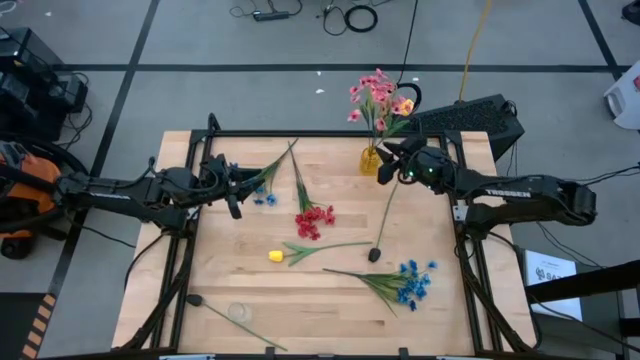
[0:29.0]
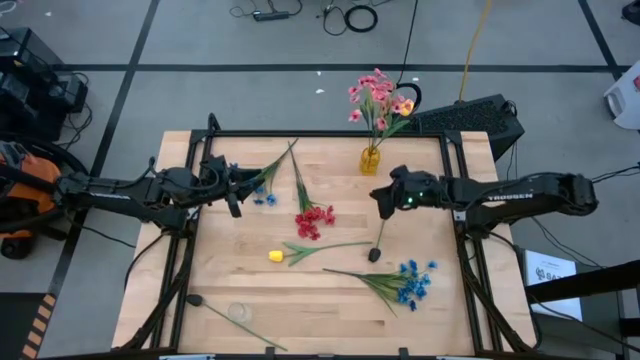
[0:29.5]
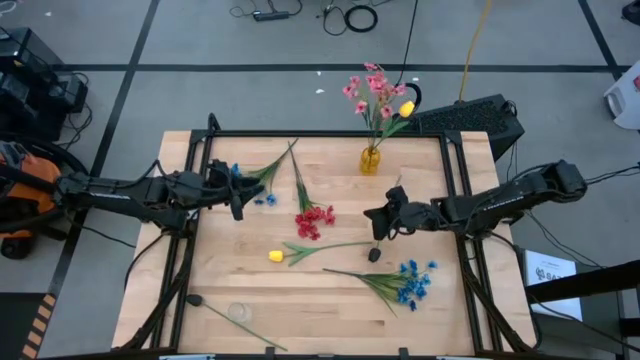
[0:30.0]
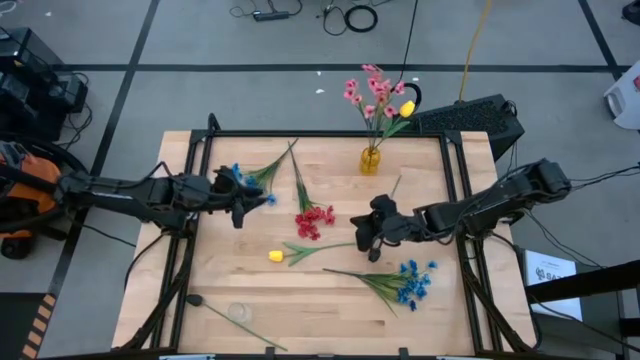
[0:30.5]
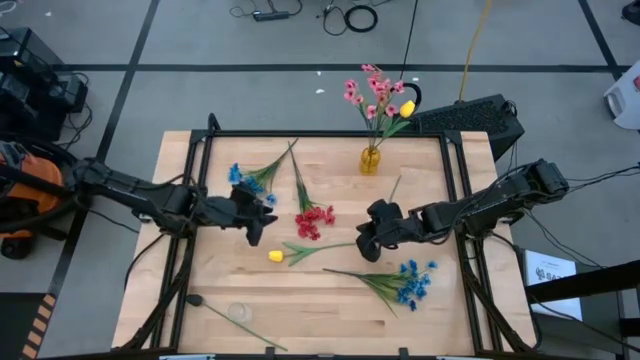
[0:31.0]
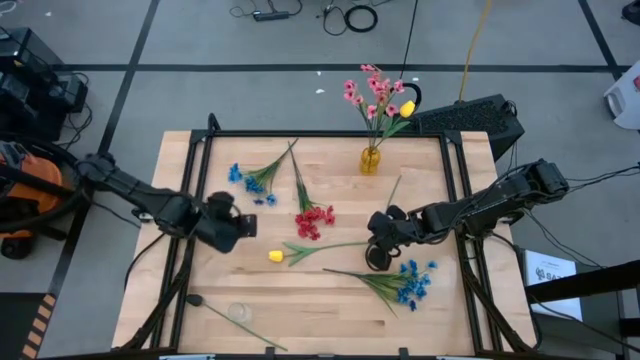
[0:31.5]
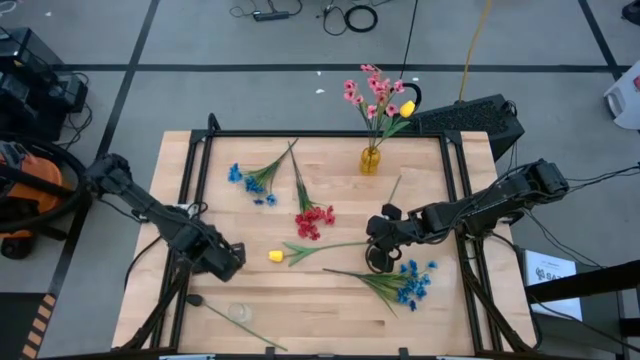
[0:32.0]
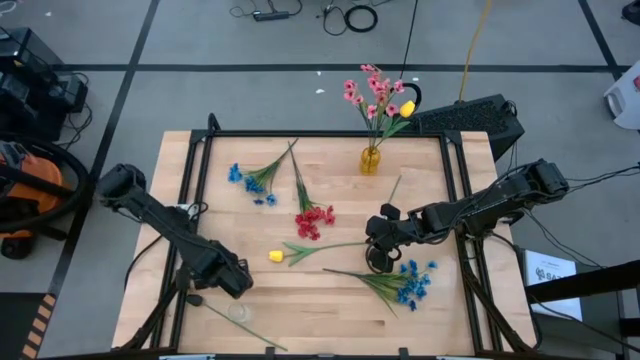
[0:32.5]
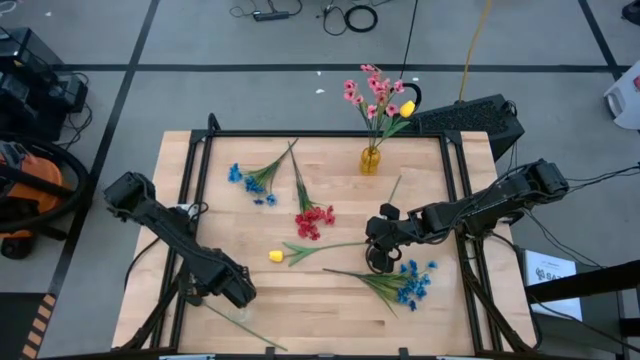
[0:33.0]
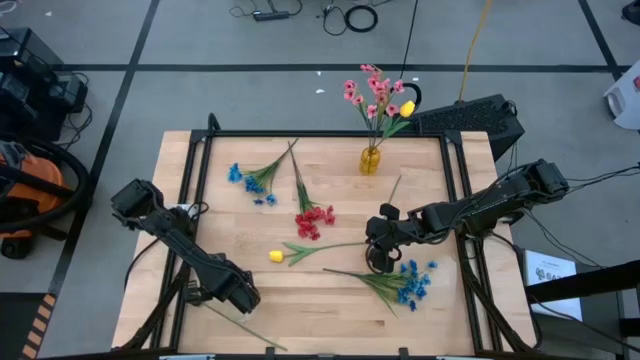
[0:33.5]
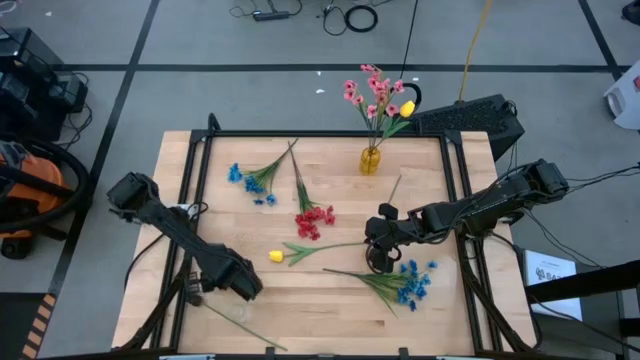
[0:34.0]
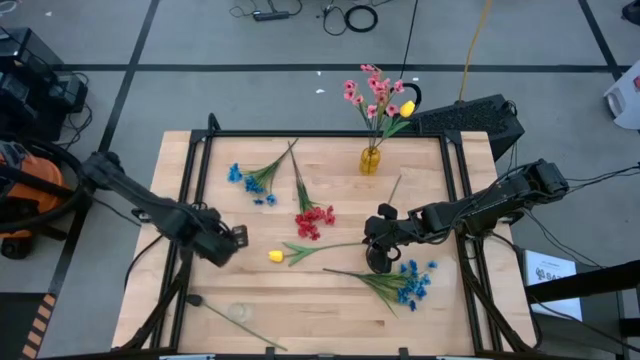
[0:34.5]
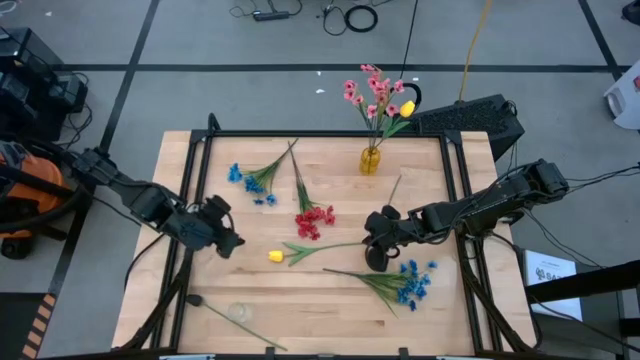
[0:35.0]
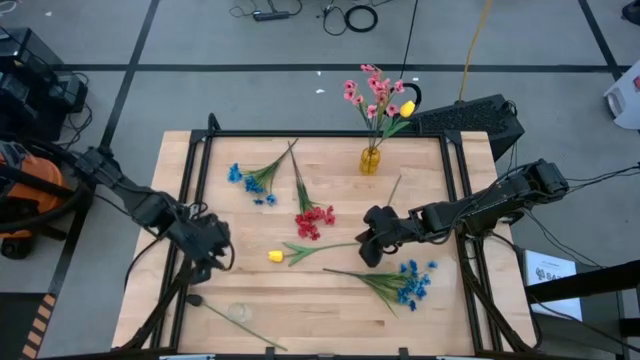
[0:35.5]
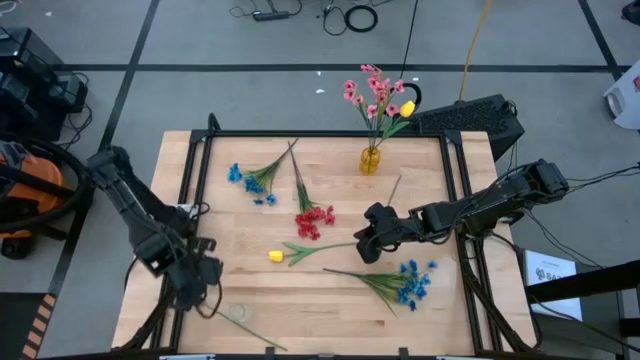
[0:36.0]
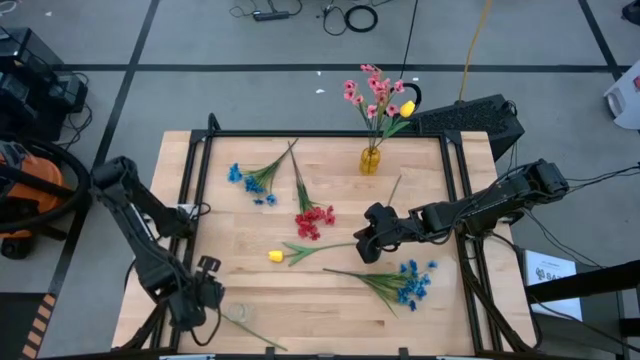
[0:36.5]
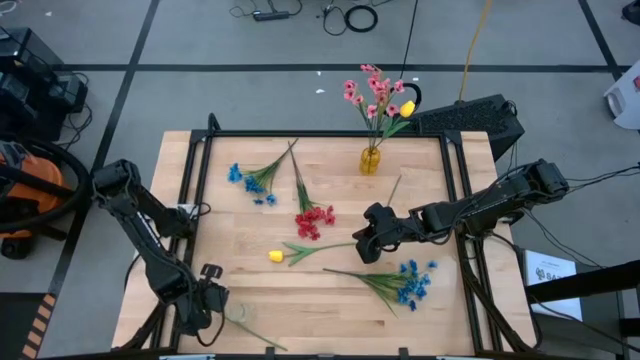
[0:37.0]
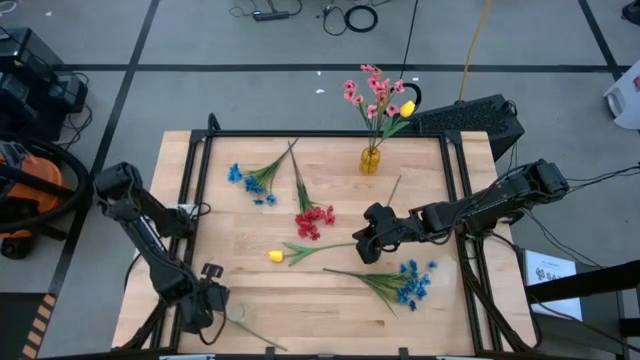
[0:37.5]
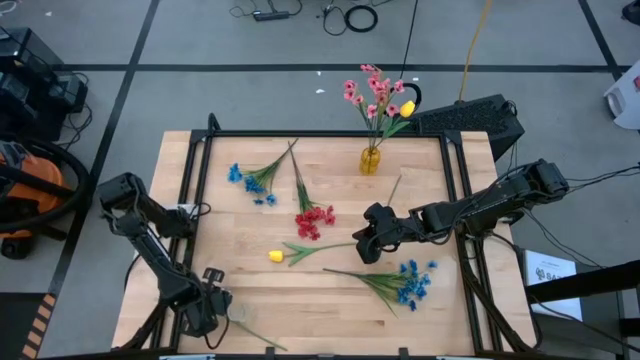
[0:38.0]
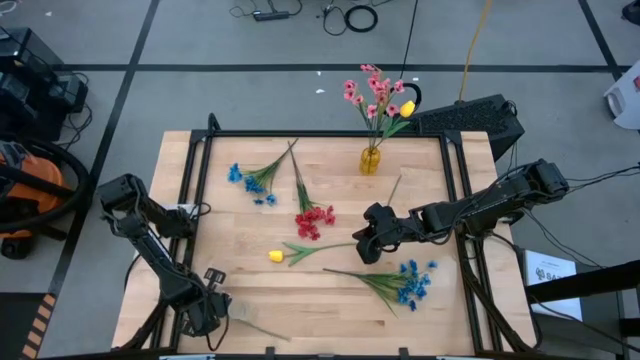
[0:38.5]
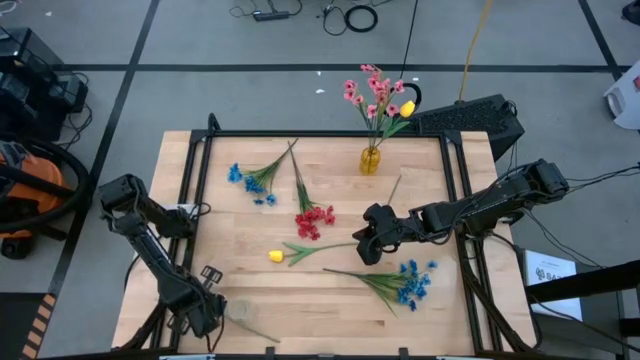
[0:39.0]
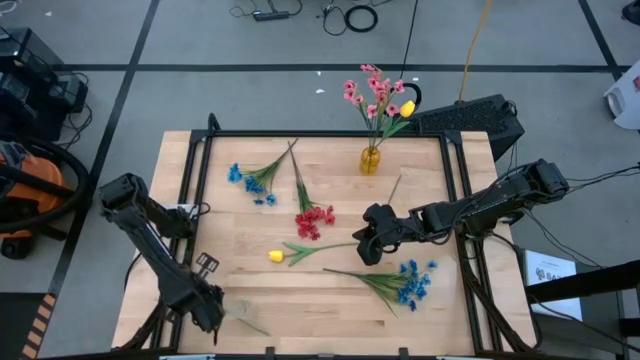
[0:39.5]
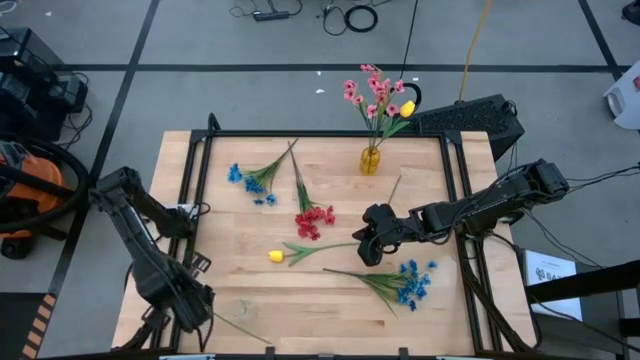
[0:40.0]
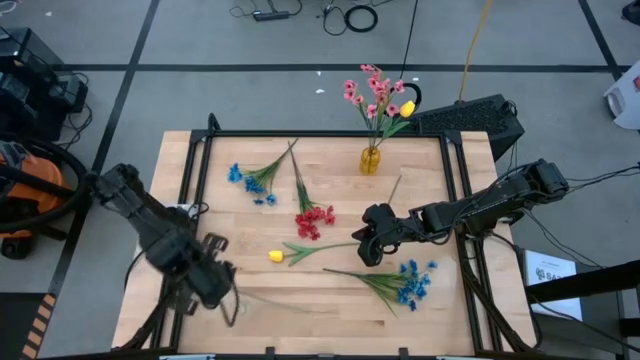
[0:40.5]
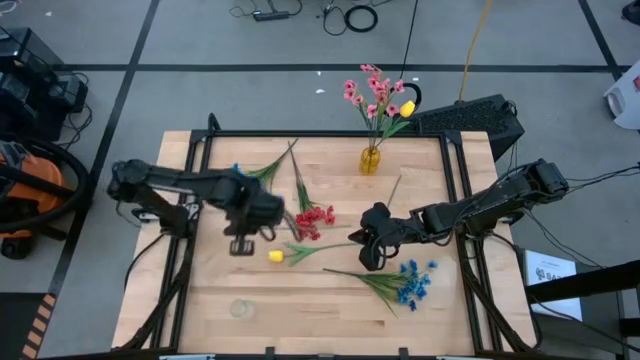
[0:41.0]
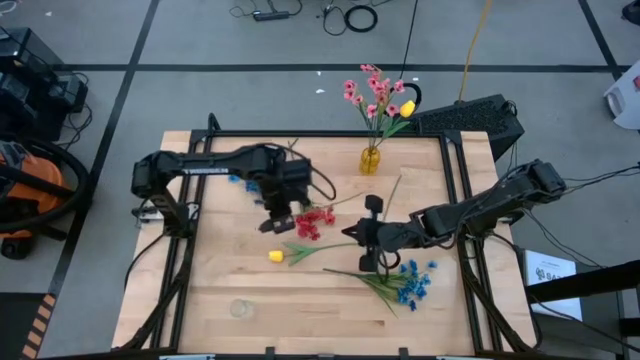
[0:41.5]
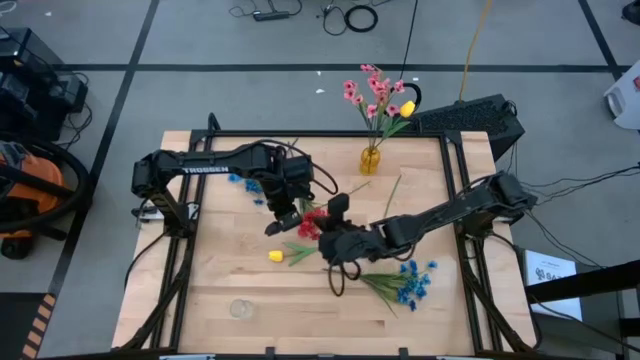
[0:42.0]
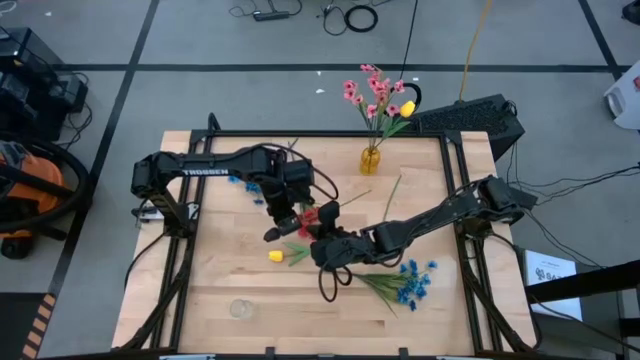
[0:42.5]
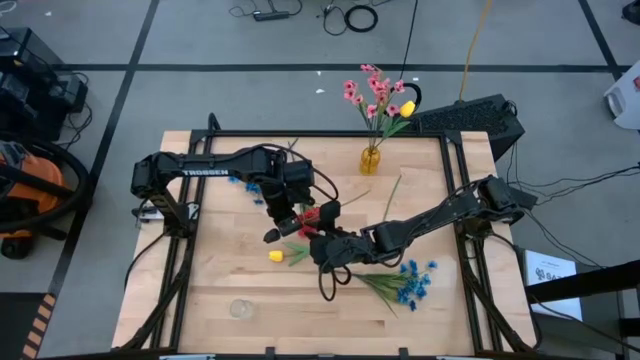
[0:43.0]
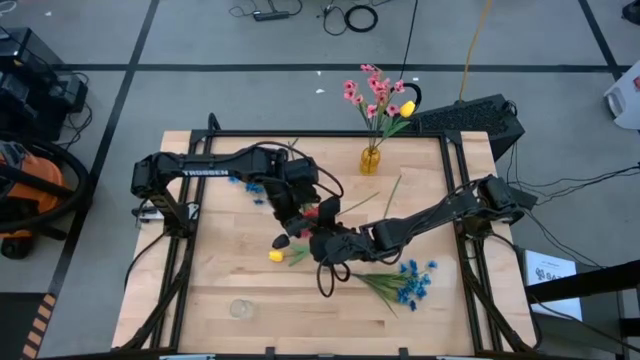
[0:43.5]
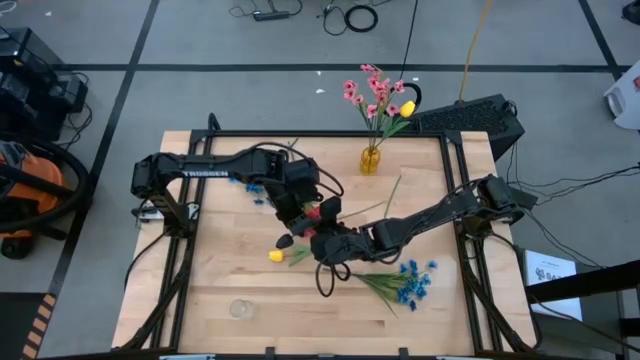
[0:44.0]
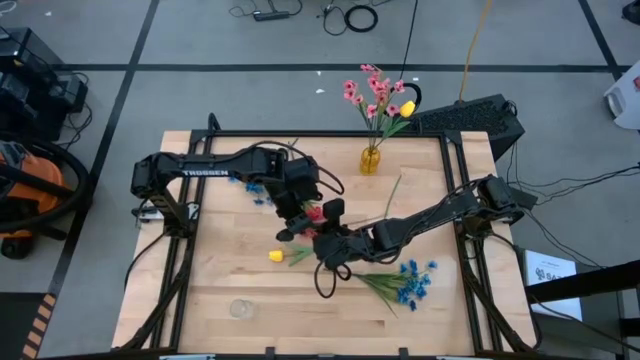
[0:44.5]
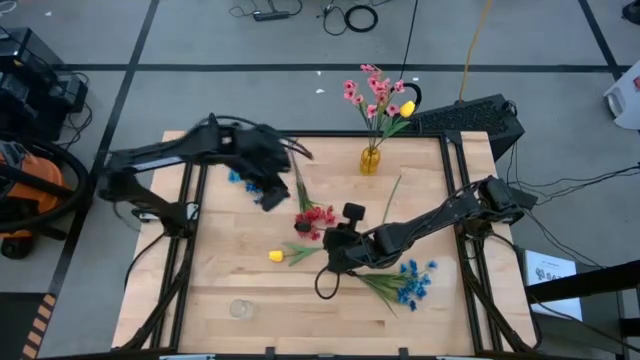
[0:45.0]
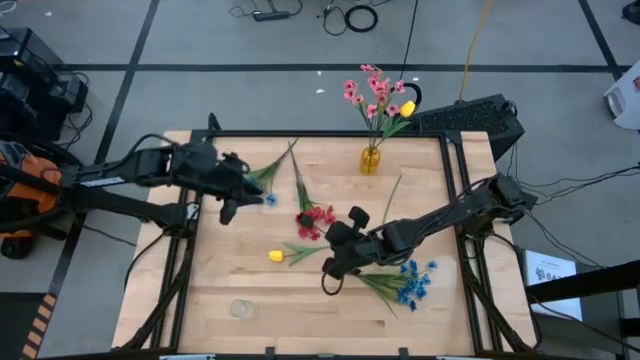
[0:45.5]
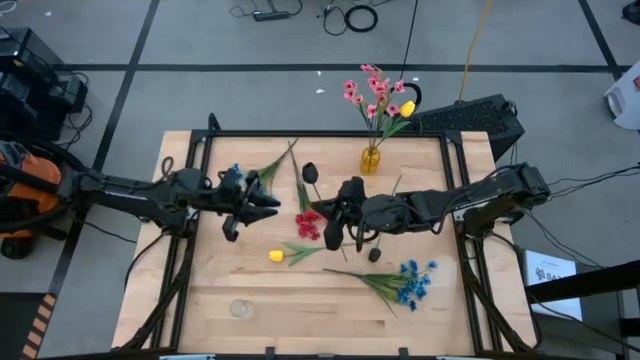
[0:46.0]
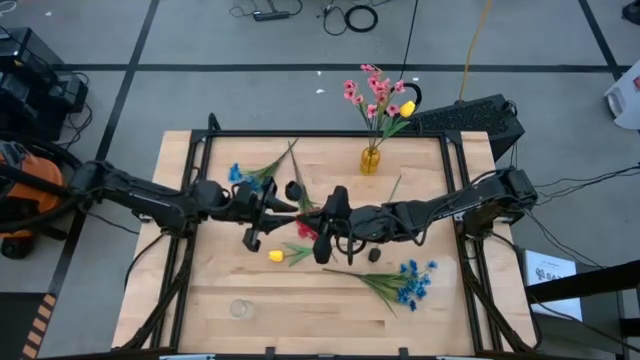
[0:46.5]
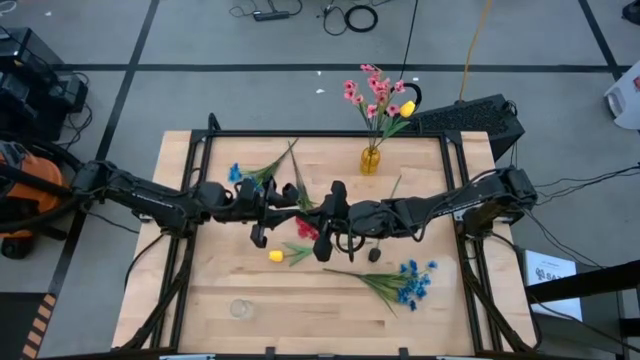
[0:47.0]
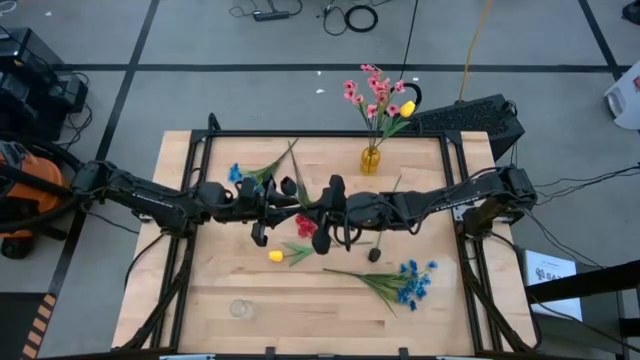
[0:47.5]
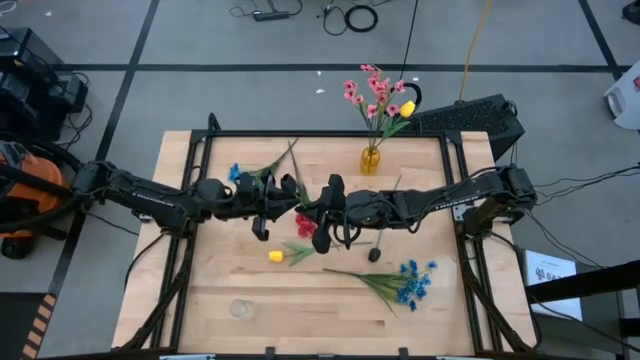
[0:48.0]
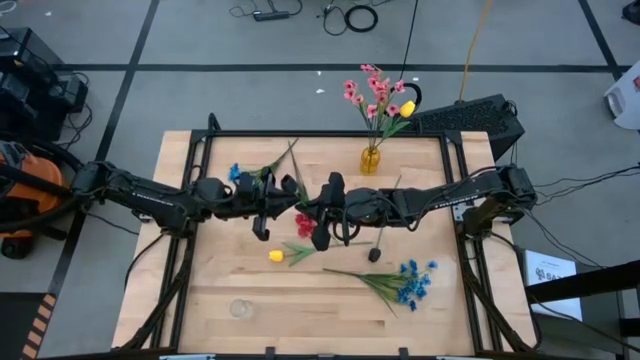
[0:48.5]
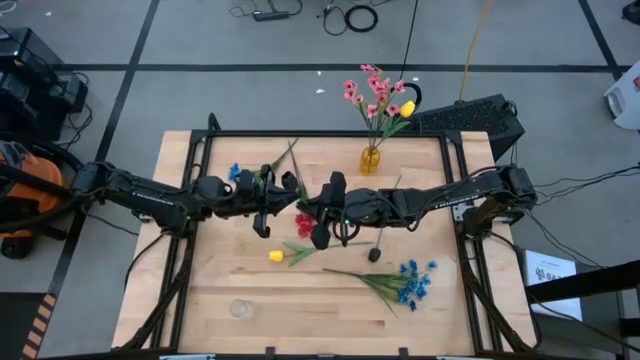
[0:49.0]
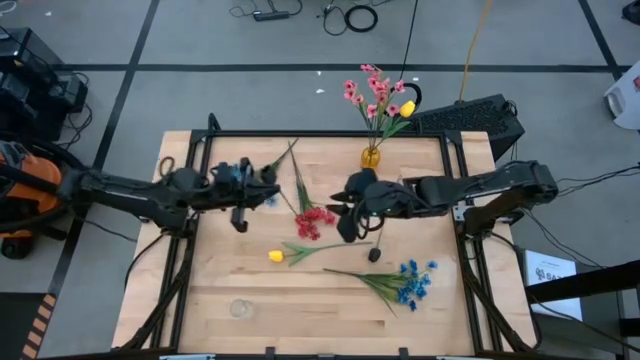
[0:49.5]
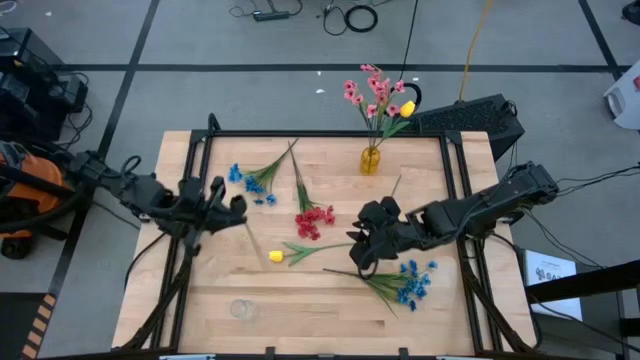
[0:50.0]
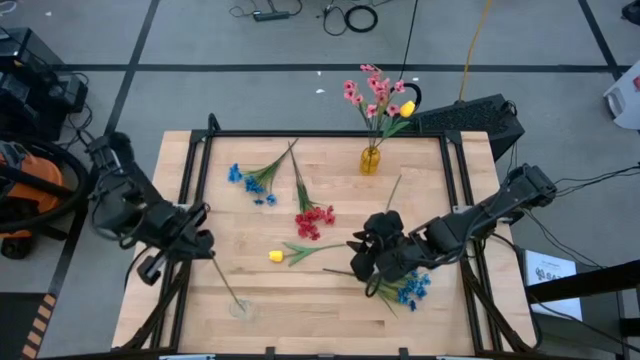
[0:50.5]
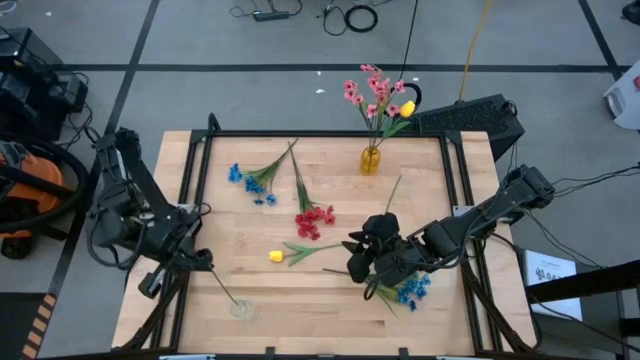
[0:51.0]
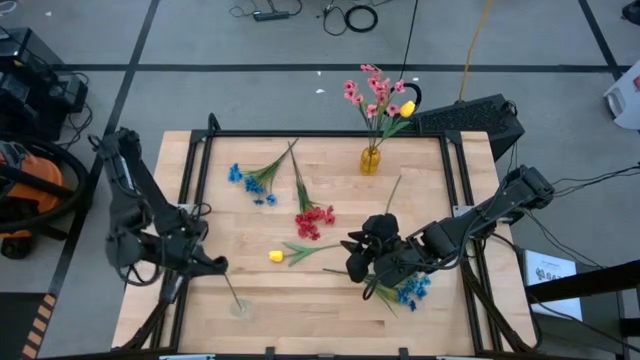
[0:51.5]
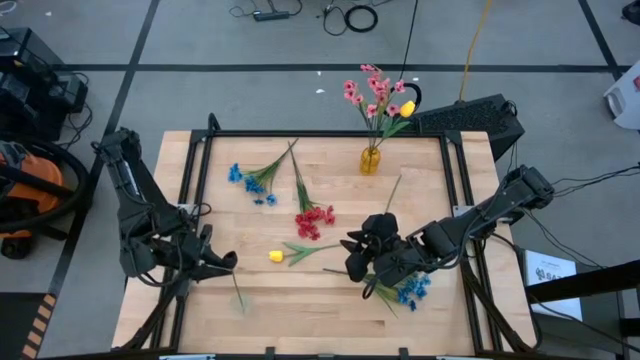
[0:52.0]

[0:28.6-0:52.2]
Task: Sort flowers into vase by color
Put the bottom black flower into the transparent vase
